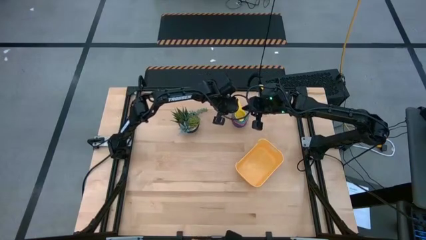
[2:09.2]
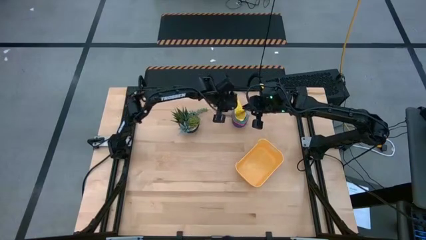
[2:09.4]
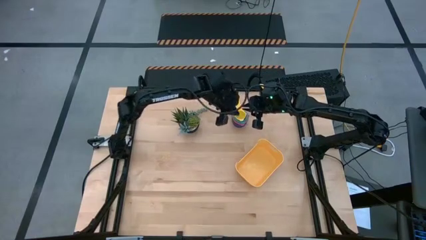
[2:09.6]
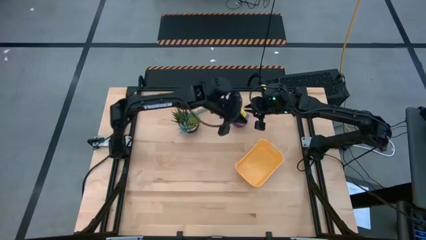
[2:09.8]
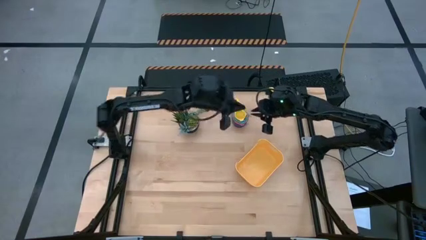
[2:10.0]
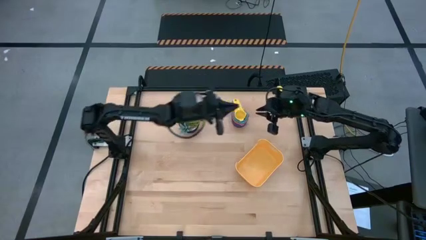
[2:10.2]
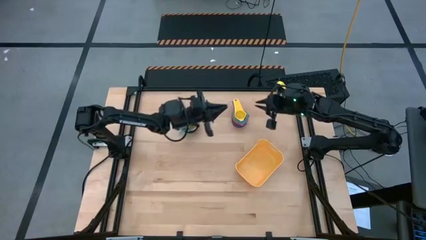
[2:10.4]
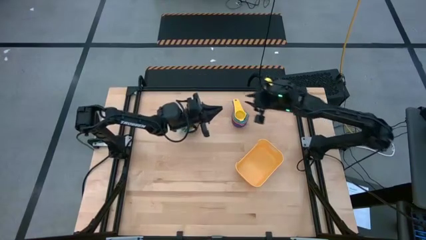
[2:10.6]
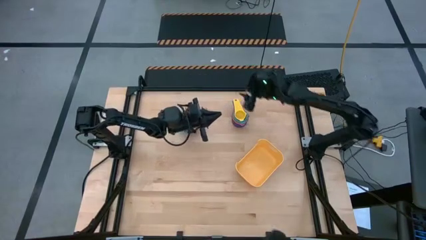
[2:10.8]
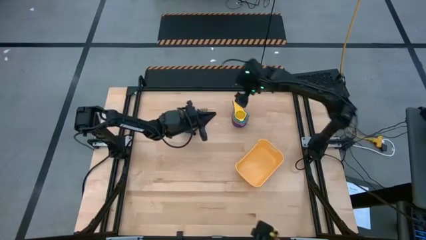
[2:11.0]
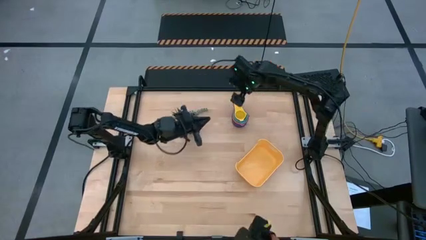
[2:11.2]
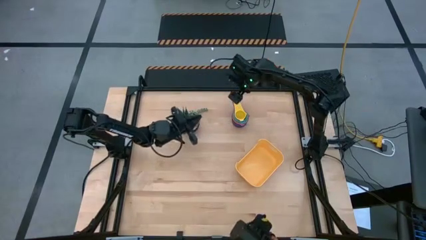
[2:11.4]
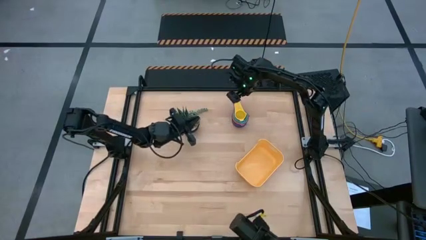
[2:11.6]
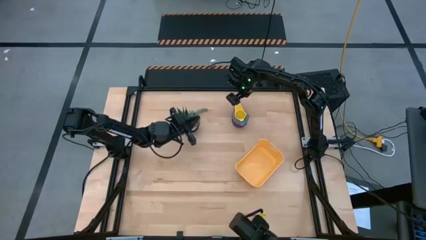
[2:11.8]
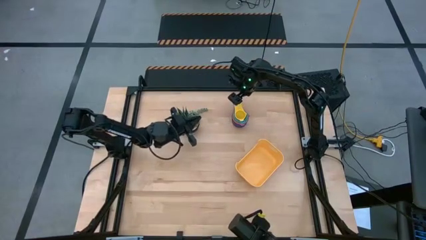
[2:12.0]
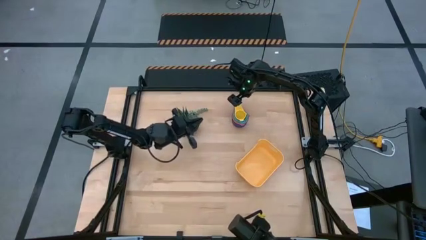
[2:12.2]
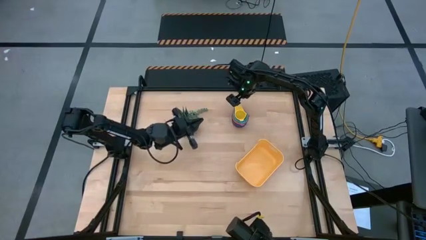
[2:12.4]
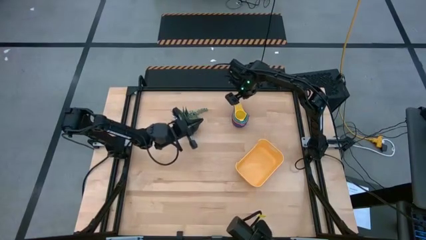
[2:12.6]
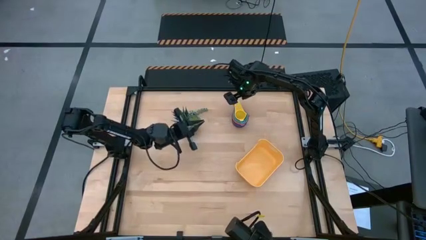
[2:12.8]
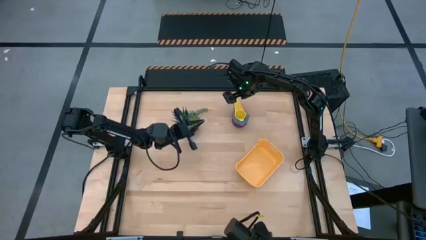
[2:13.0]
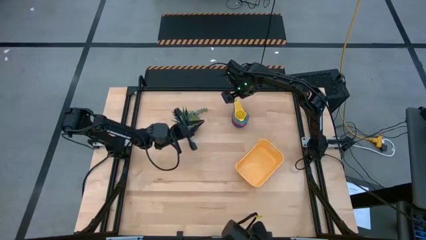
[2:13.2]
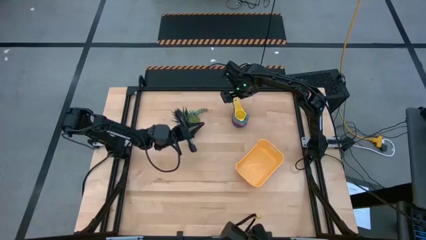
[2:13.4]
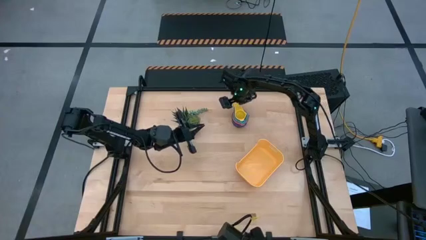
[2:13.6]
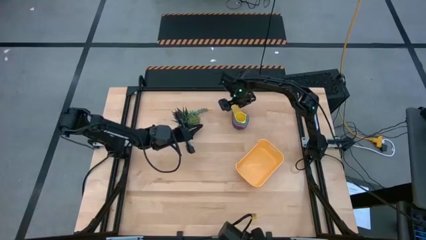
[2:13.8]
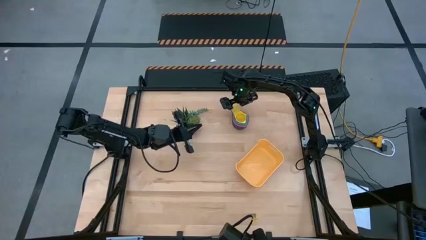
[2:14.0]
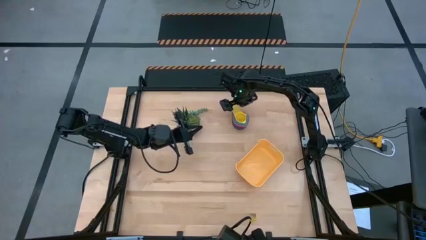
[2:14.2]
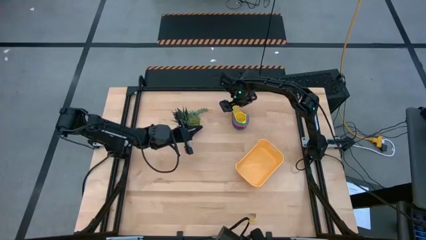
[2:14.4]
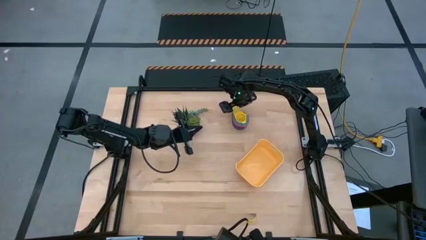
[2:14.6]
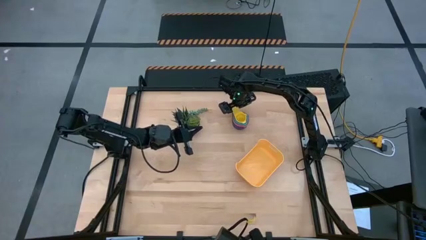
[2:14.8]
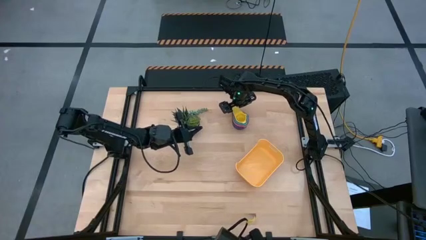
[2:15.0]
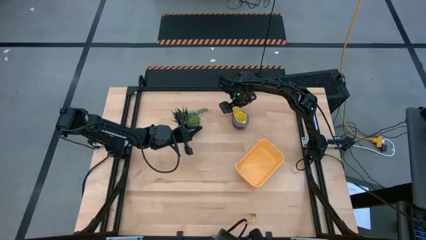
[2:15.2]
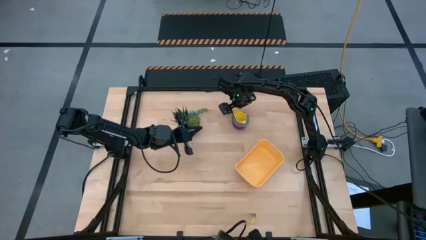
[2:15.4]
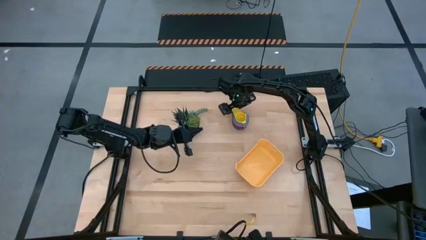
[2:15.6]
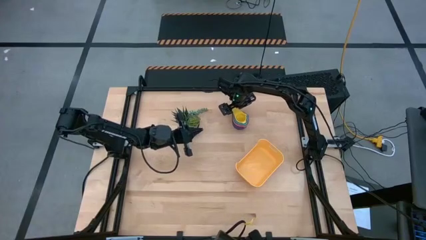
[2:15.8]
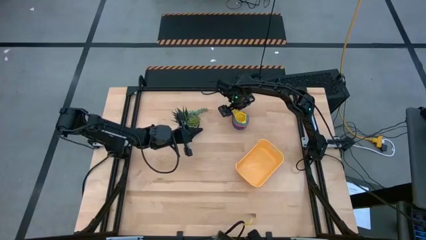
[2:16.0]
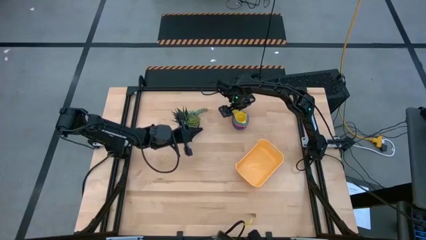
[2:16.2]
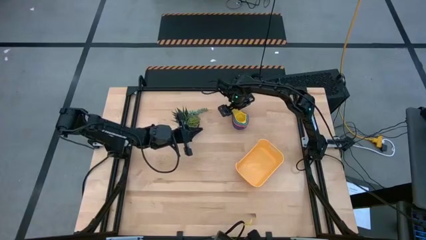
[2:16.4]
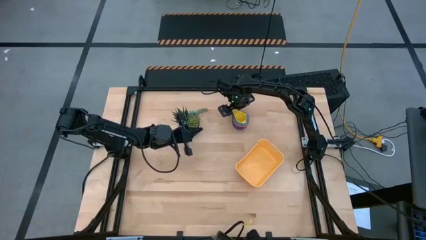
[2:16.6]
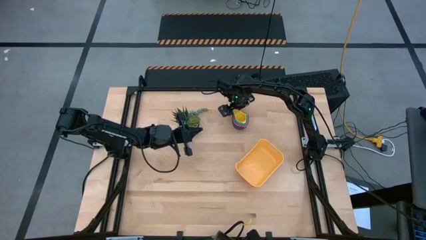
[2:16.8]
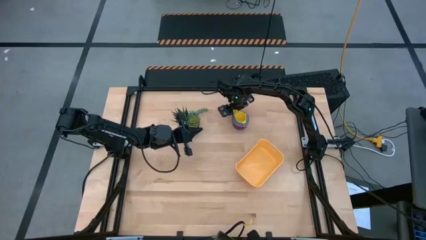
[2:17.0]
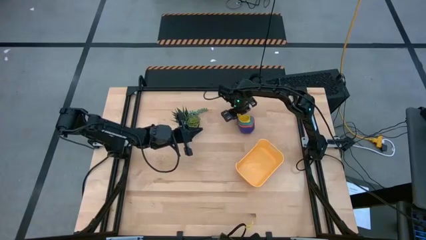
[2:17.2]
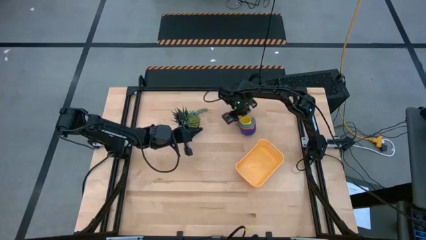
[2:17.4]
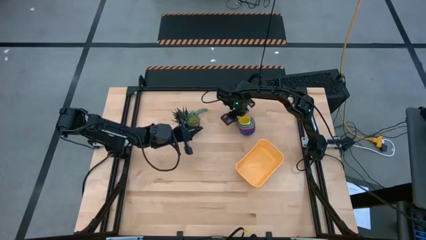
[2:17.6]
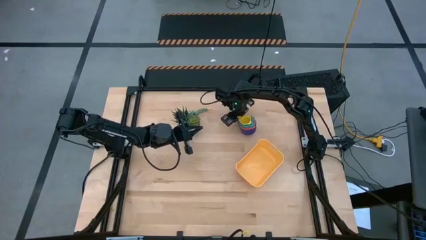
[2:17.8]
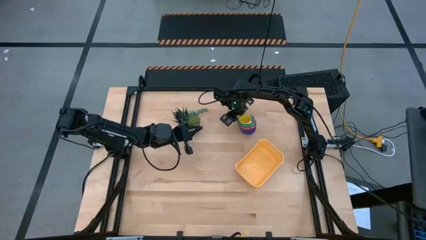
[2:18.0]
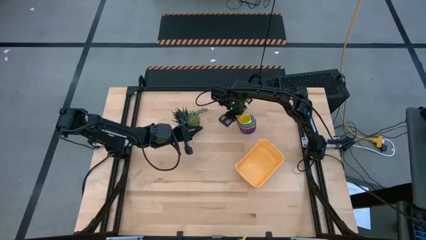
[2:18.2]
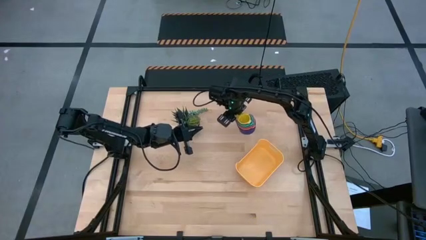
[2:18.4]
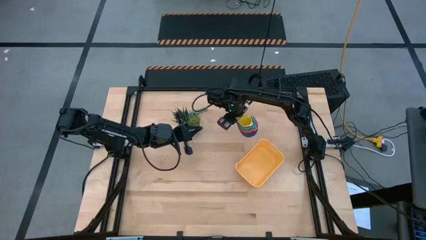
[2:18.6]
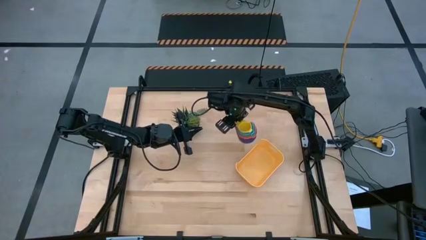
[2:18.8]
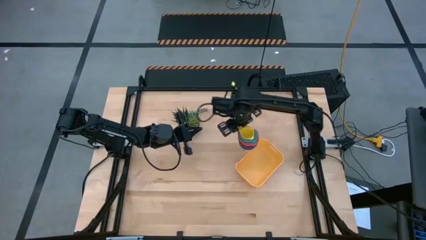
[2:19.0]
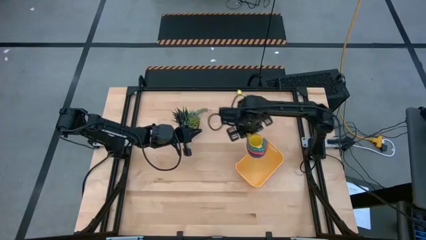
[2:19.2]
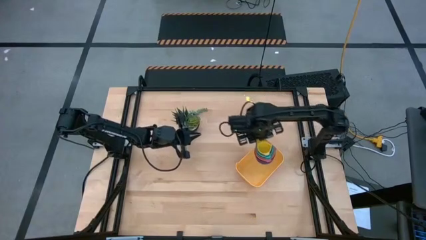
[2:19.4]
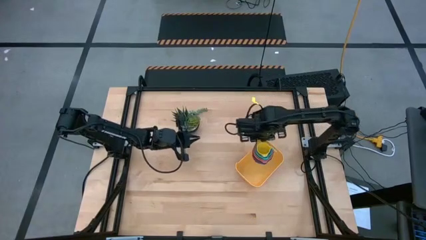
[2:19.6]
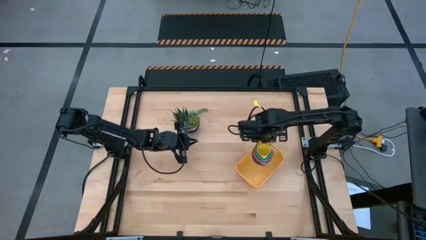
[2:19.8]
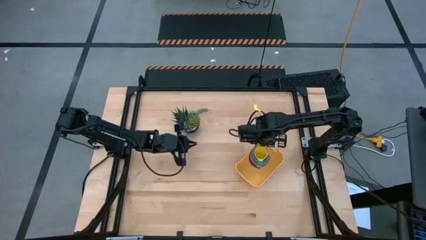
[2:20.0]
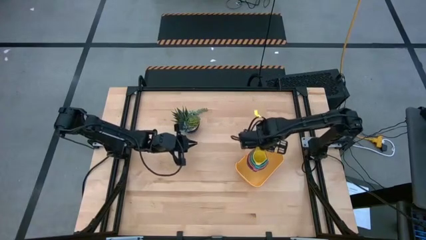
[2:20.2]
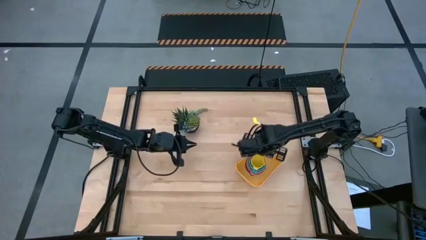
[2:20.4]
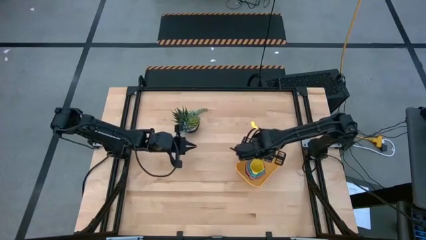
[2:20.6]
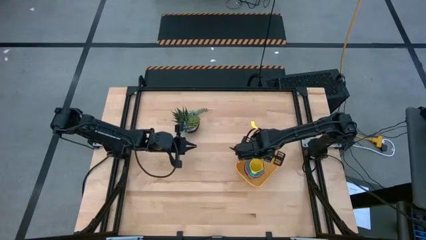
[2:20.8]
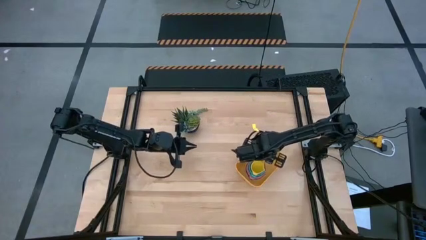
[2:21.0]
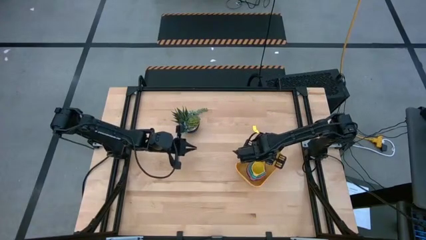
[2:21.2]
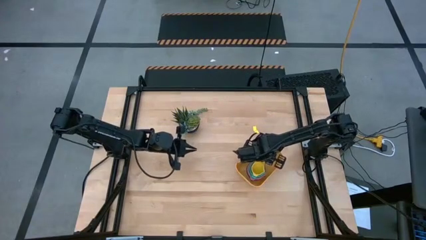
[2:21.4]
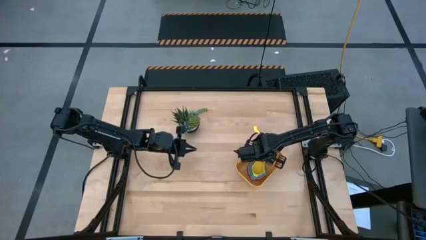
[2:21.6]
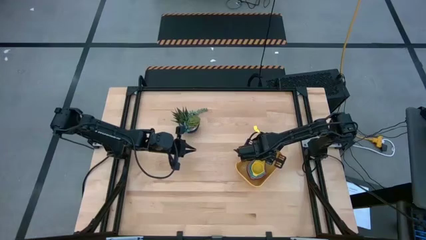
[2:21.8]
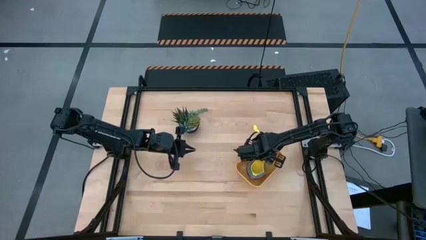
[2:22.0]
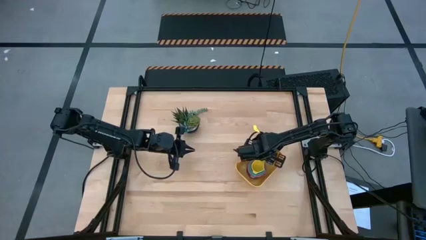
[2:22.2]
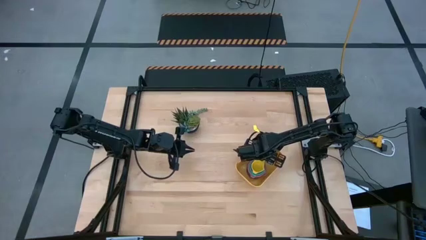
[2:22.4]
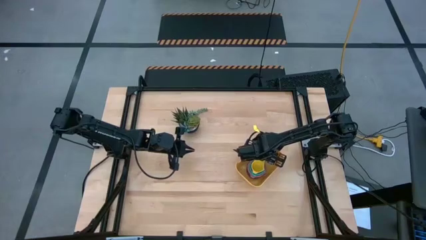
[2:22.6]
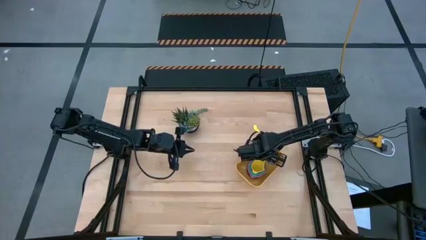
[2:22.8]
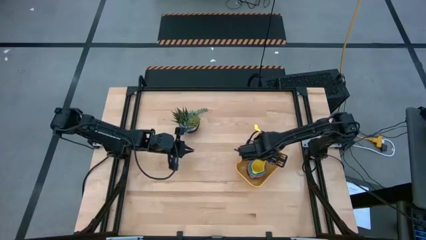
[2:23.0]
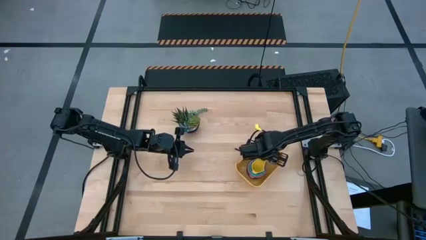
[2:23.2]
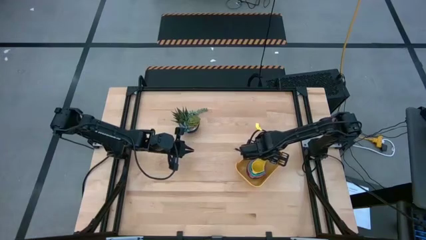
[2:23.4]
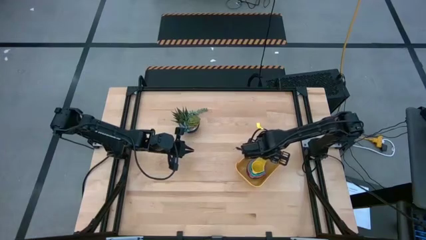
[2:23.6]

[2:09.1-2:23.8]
Task: Nest measuring cups in basket
Put the stacked measuring cups into the bin

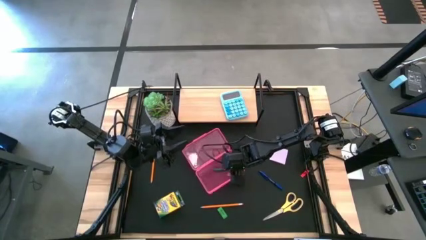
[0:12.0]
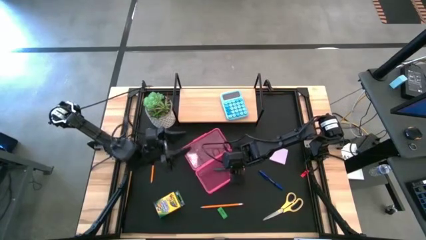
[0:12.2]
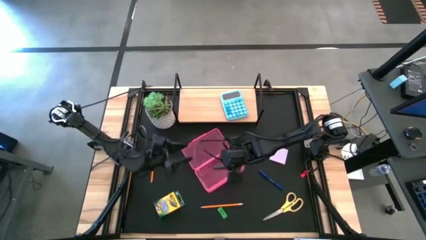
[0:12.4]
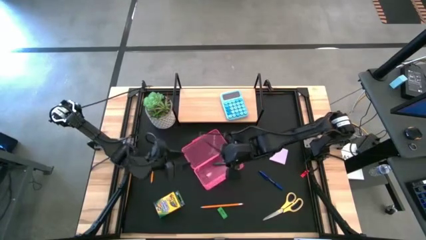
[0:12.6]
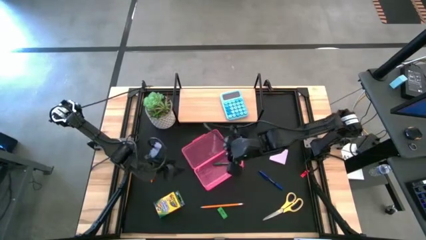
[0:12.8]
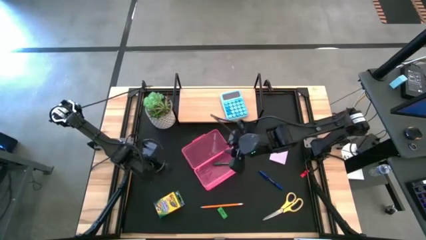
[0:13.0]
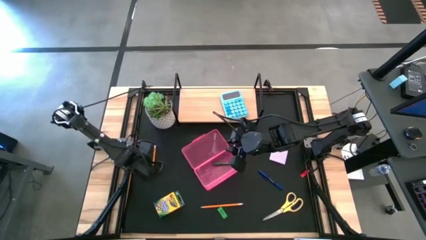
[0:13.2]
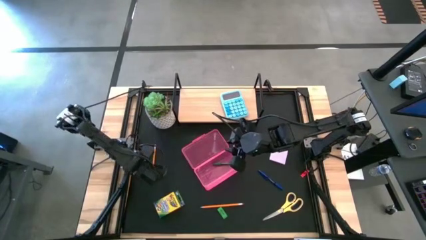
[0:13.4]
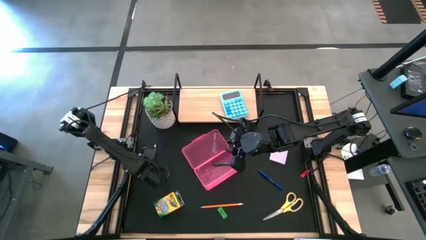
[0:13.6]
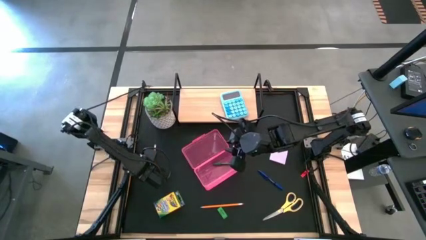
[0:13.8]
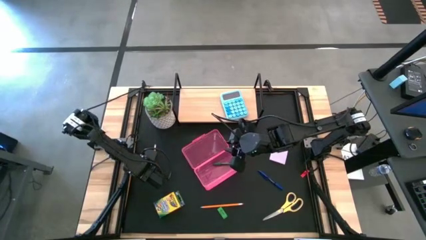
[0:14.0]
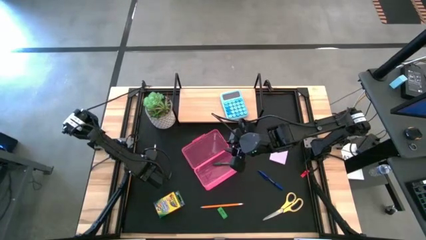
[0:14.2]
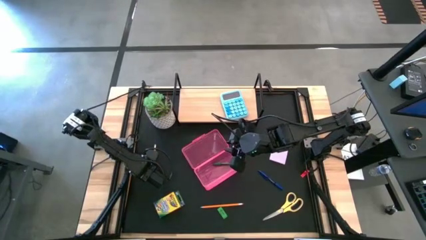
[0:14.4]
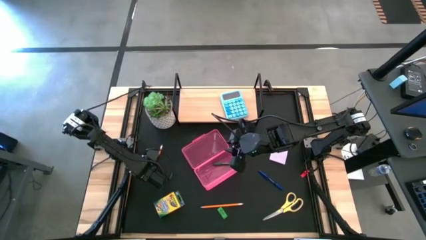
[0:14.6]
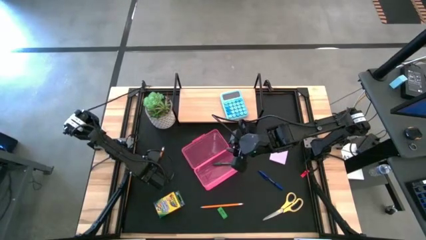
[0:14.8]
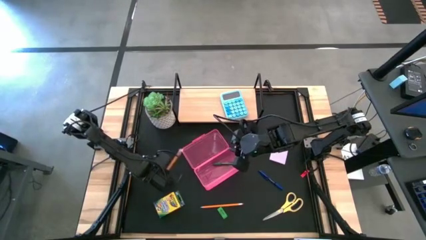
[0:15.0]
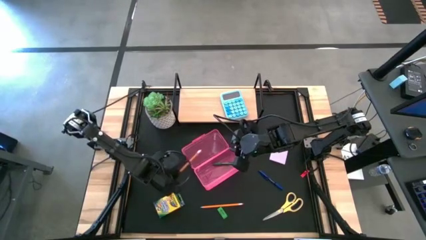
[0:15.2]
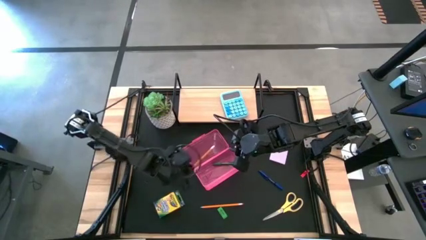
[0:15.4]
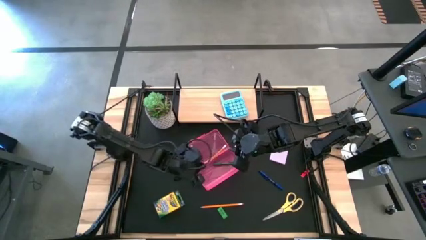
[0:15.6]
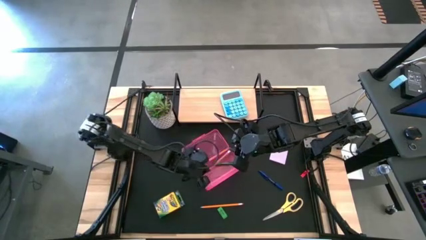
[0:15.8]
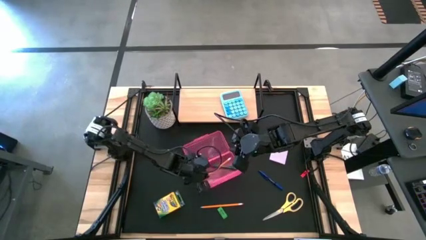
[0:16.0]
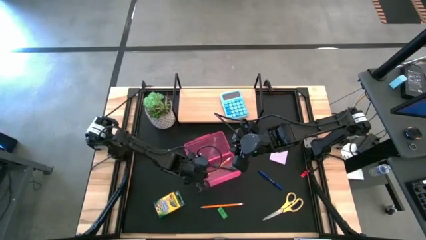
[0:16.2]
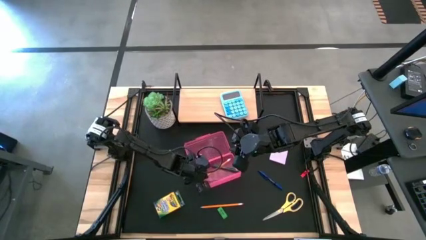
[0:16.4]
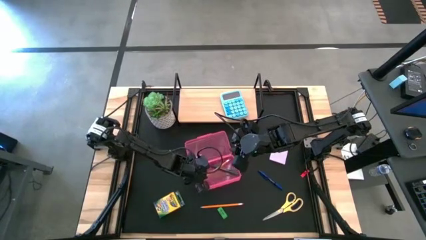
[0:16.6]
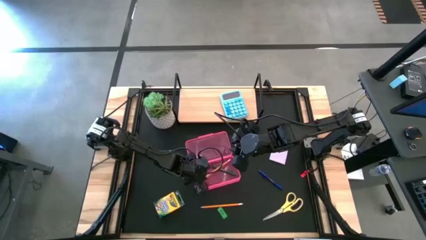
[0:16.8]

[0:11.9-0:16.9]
Task: Pack school essentials
Put the orange pencil into the red supply box
